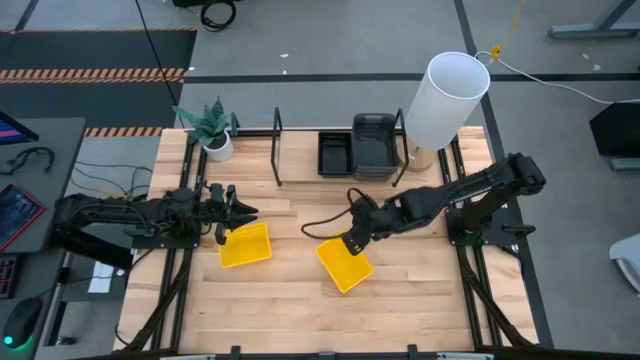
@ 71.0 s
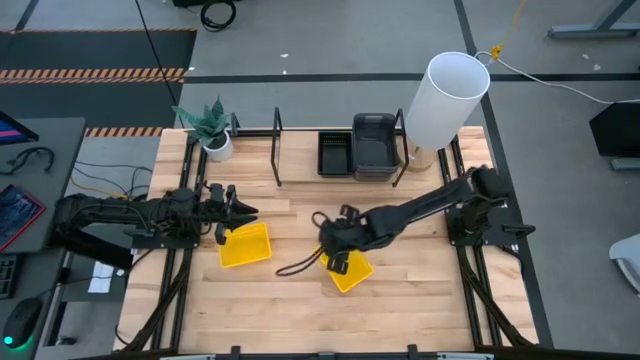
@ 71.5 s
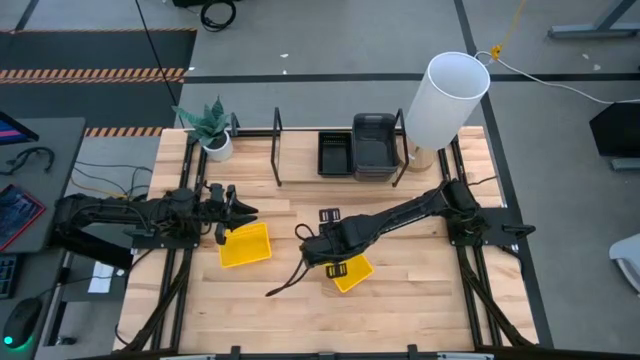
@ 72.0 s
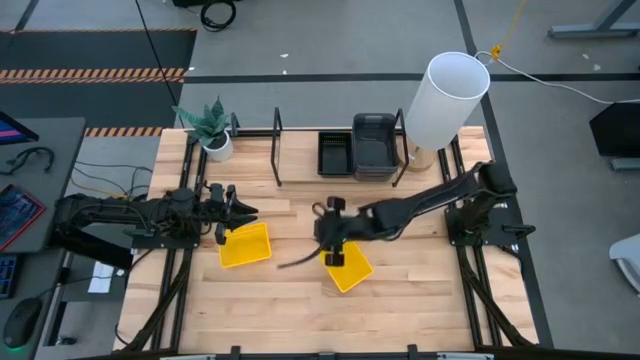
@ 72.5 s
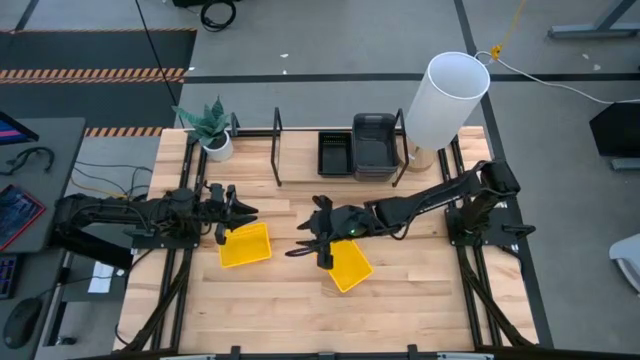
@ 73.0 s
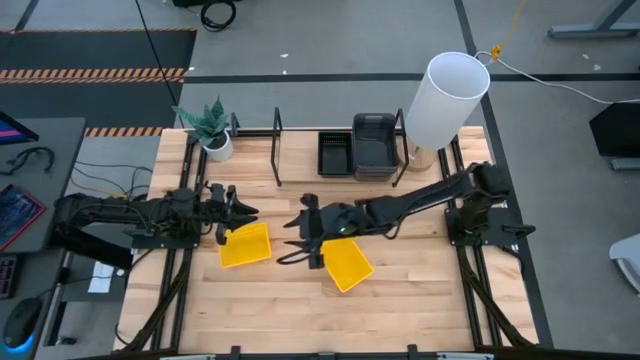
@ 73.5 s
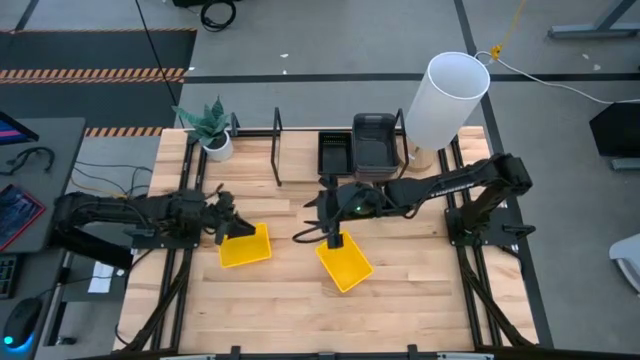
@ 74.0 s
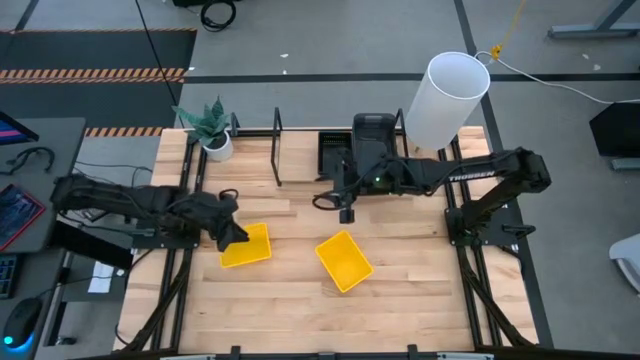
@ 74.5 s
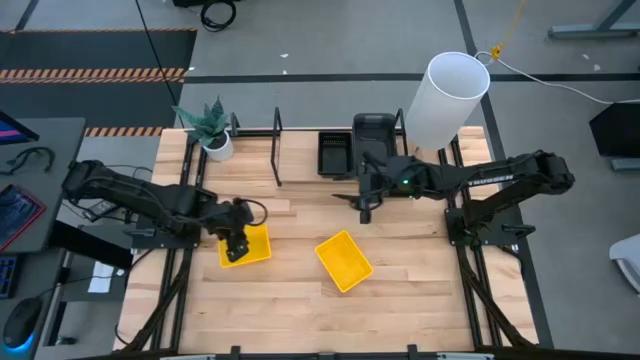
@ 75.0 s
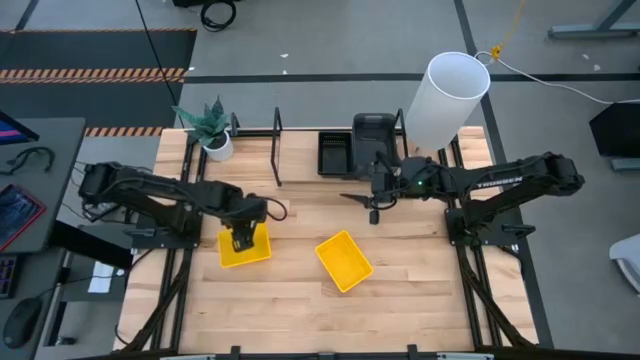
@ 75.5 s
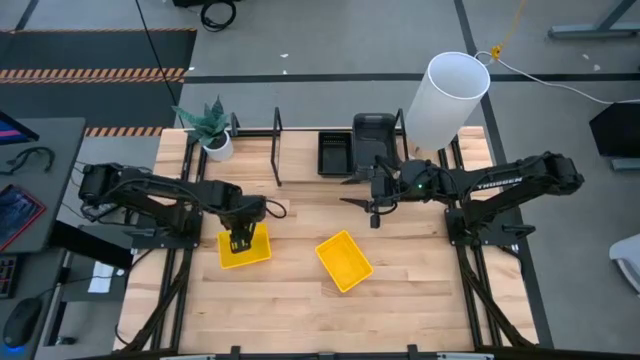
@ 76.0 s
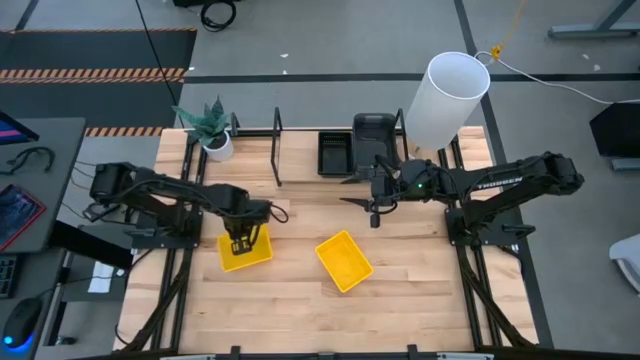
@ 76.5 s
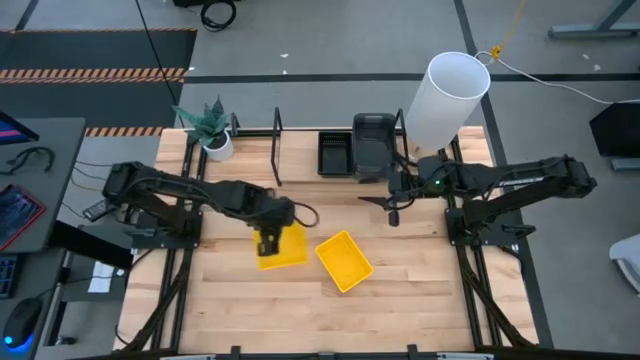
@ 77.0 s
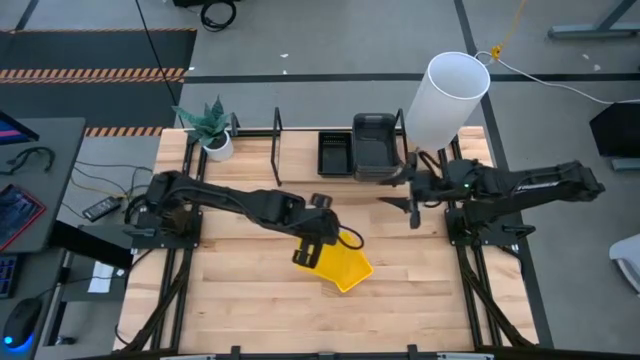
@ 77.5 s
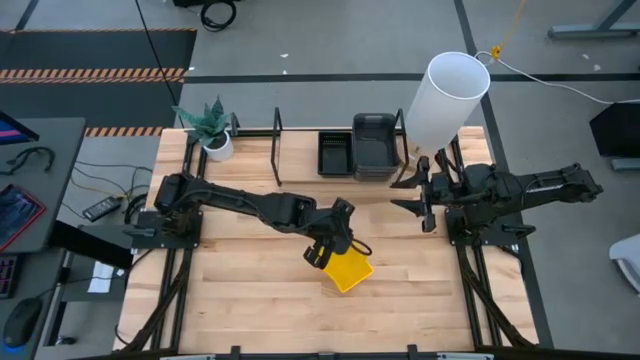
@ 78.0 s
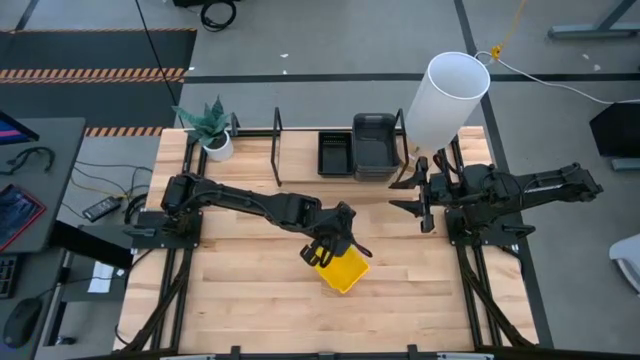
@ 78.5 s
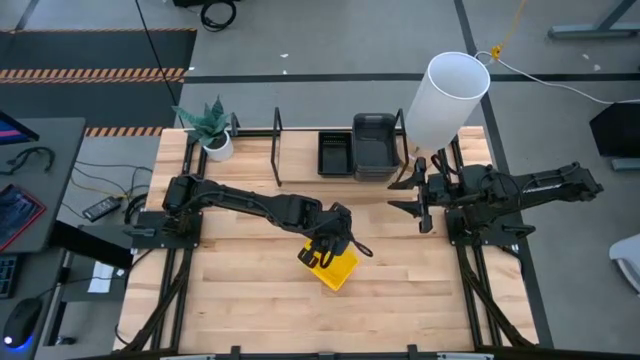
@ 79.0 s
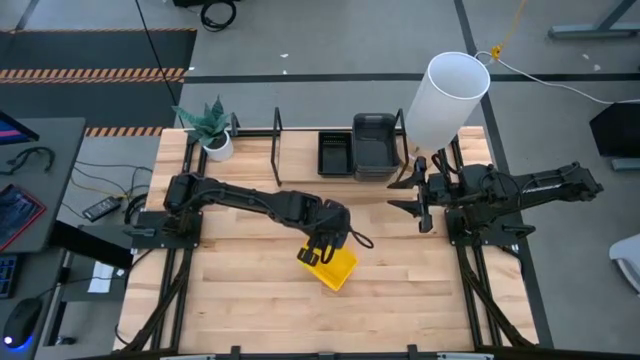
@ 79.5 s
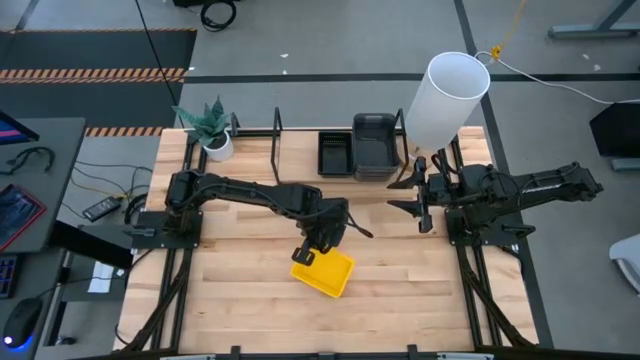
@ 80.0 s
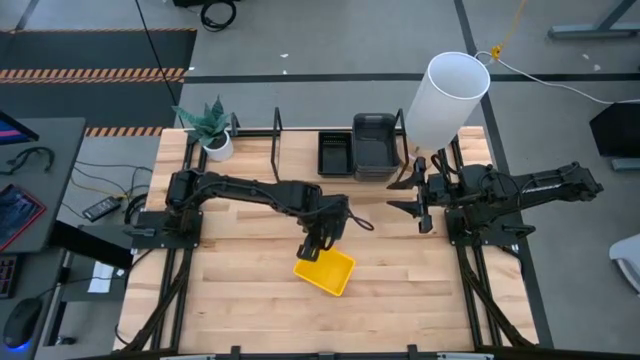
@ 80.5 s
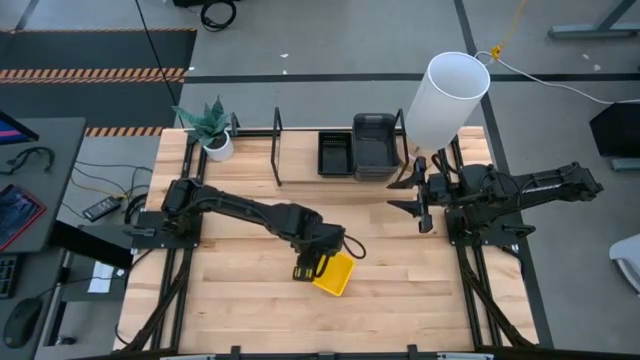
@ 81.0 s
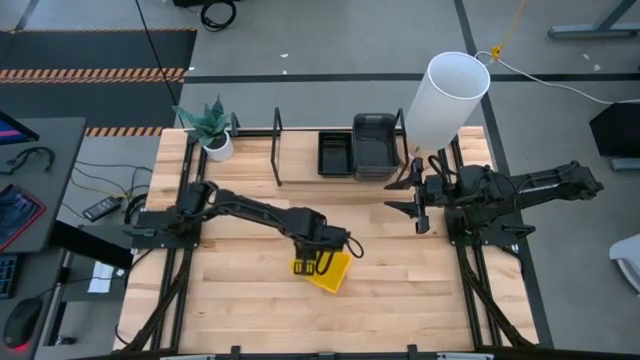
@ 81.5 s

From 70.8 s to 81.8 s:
Task: Stack baskets on shelf by color
Stack the left yellow bin on top of the right stacked yellow bins

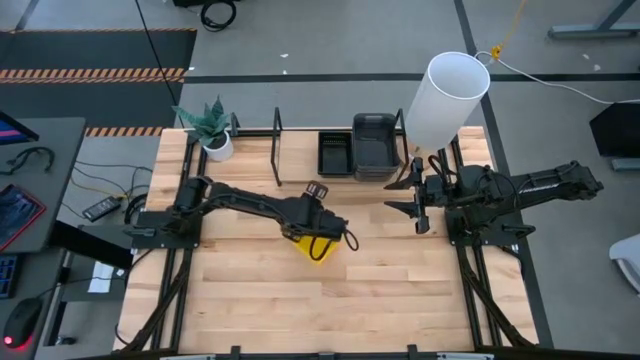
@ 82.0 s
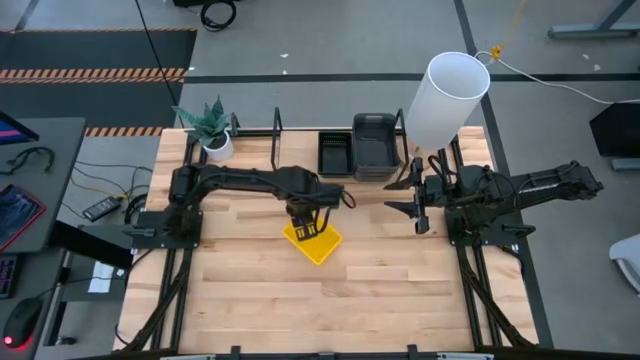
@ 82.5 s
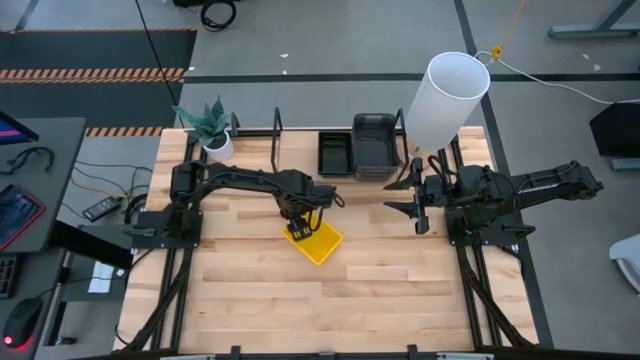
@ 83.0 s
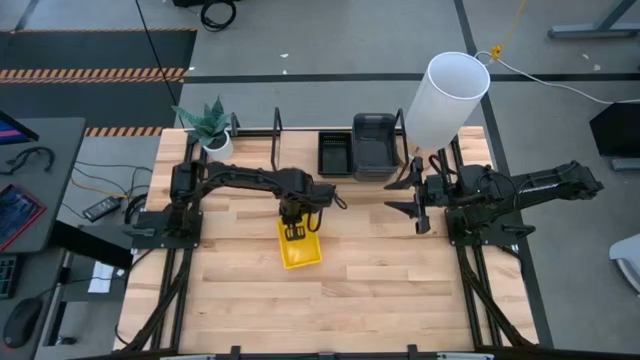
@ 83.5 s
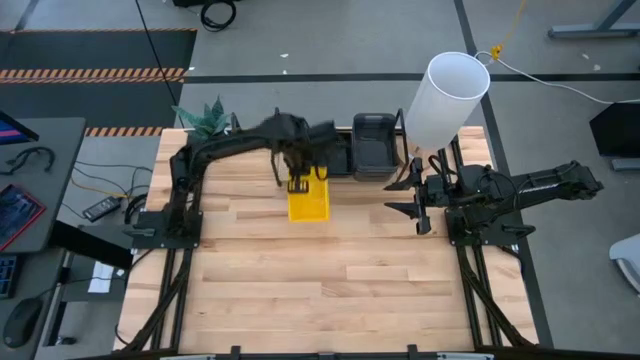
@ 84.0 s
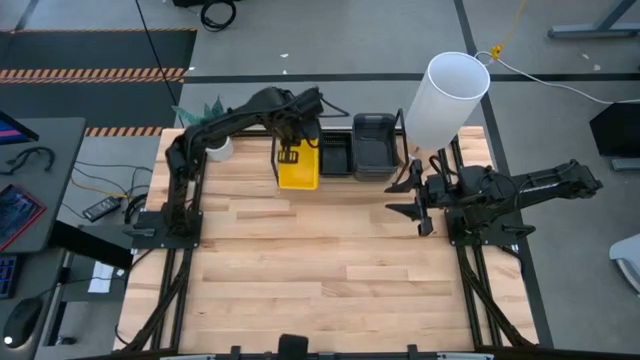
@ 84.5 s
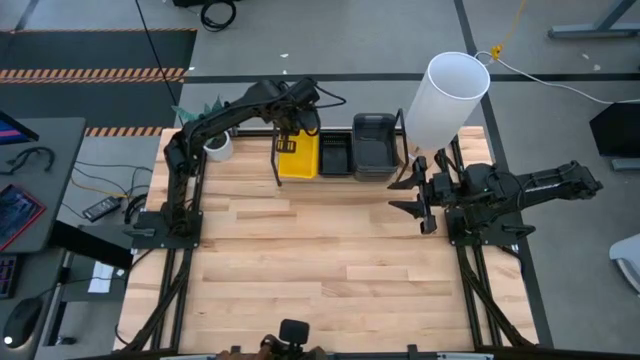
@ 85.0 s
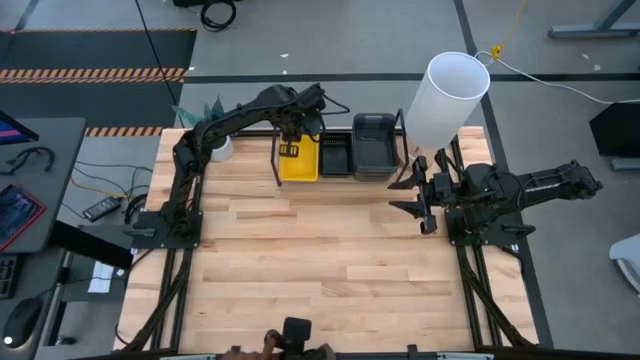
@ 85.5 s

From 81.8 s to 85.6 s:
Put the stacked yellow bins on the shelf

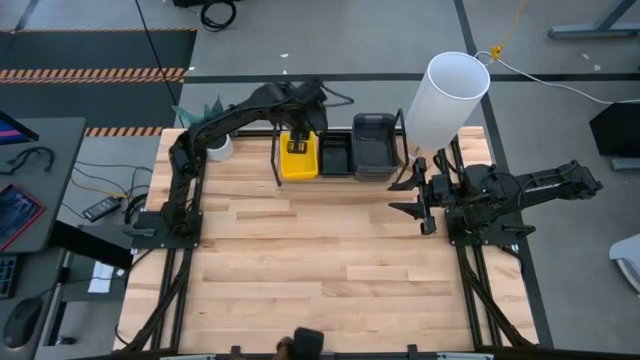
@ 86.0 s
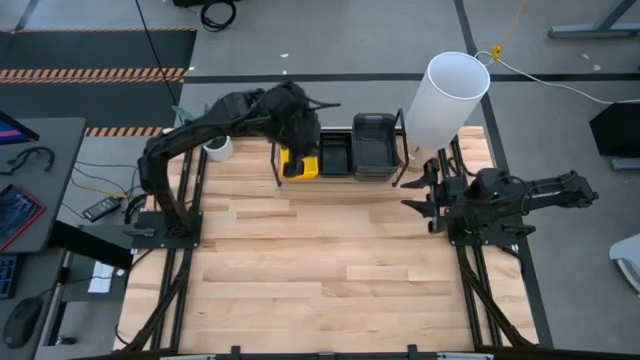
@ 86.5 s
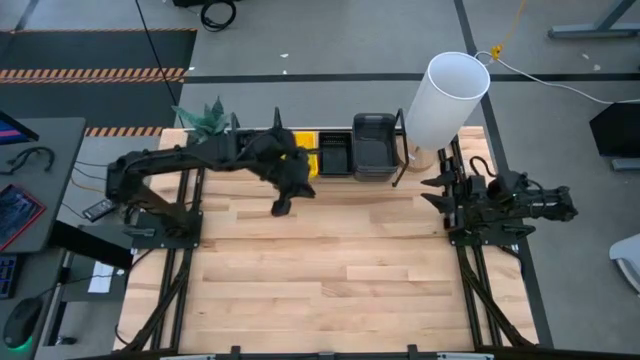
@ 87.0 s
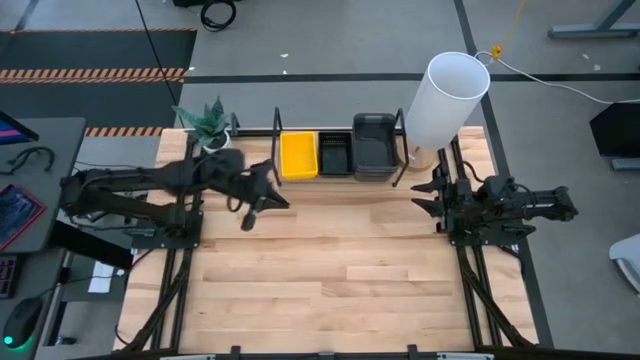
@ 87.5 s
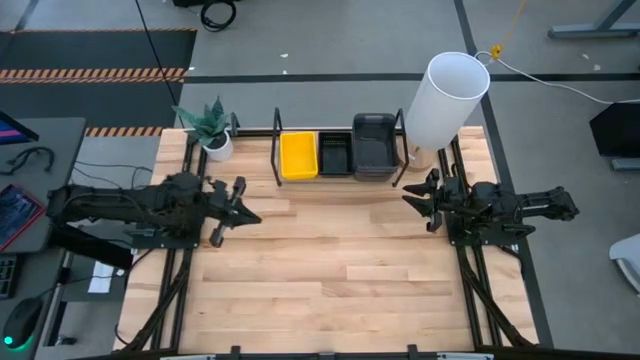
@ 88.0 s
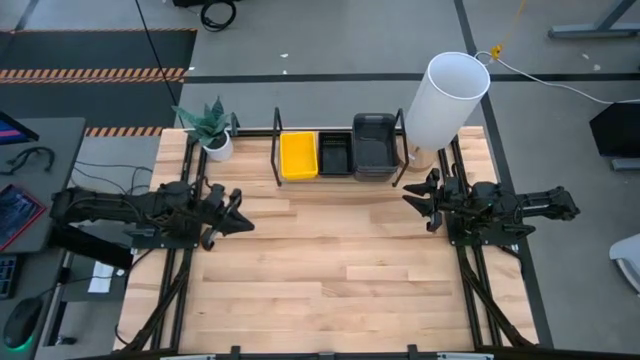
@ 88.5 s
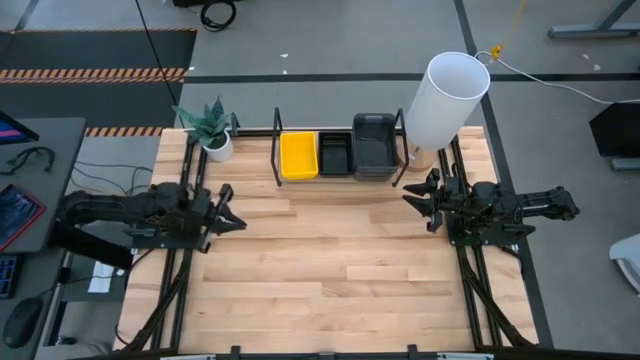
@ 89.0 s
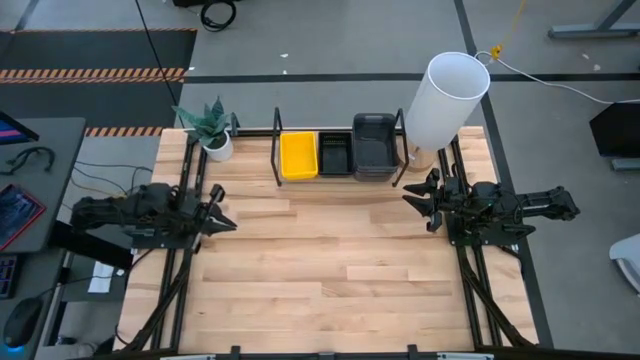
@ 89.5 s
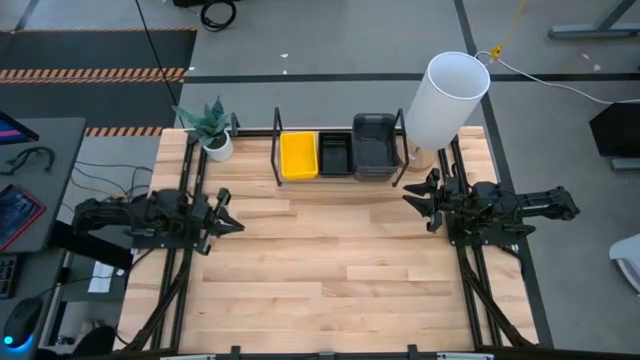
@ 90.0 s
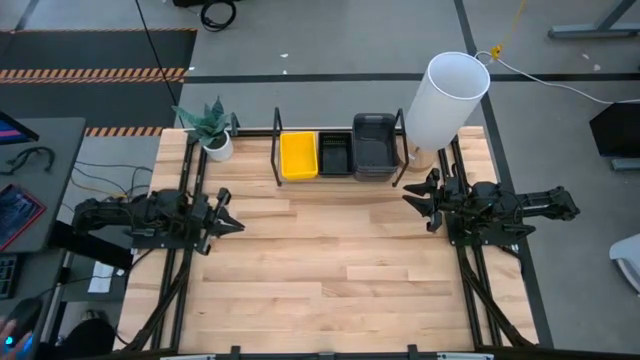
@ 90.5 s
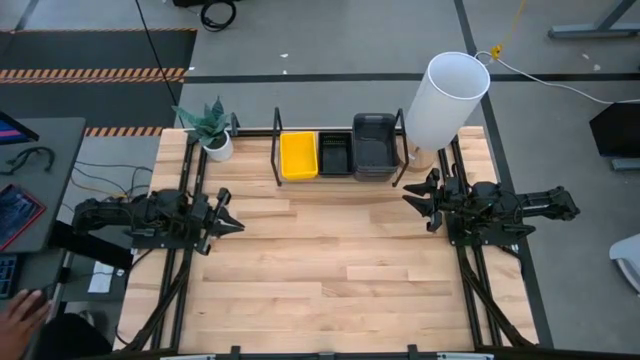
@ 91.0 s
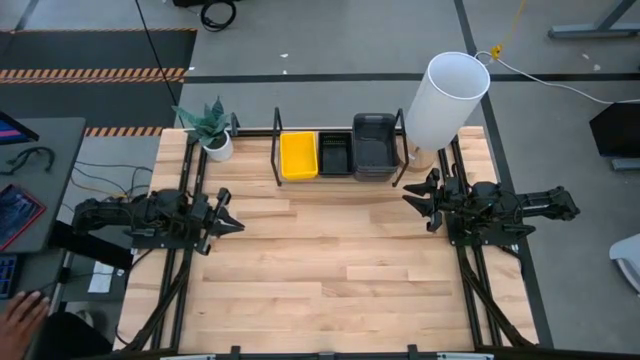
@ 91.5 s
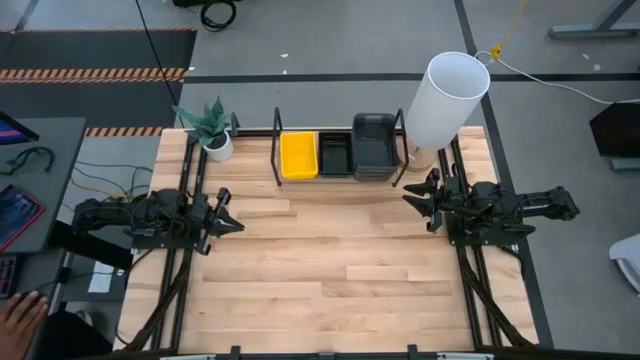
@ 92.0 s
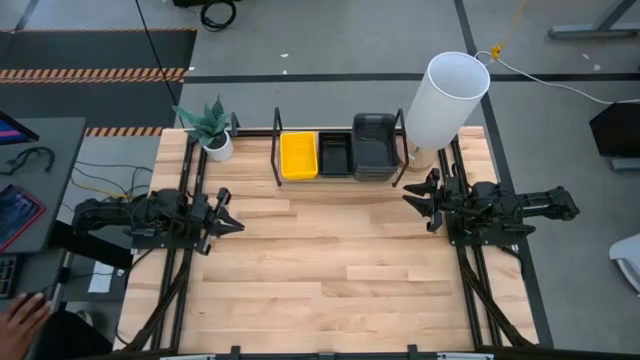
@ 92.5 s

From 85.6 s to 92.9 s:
Return to Home Position
